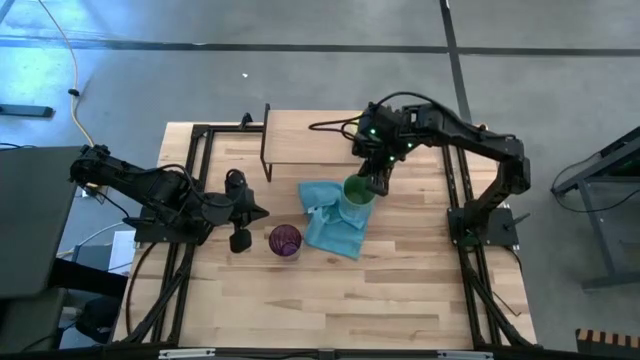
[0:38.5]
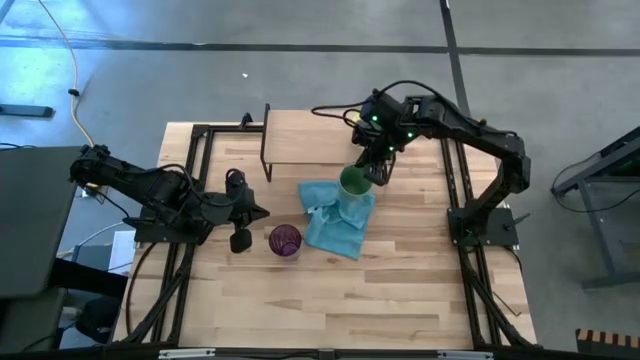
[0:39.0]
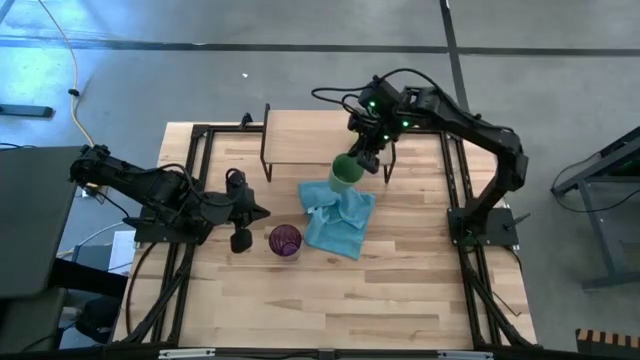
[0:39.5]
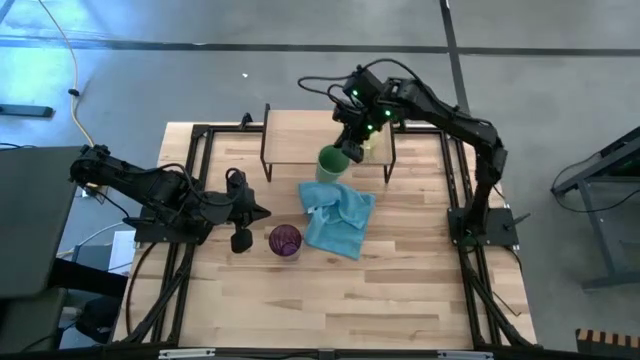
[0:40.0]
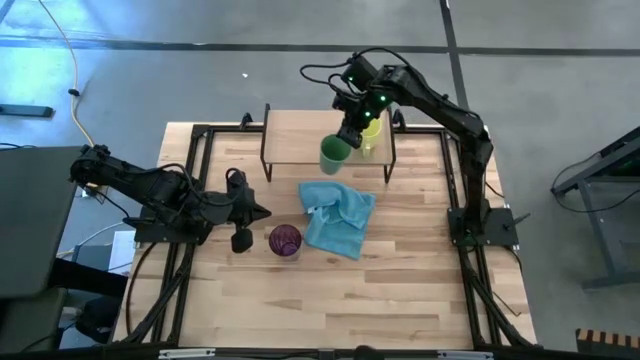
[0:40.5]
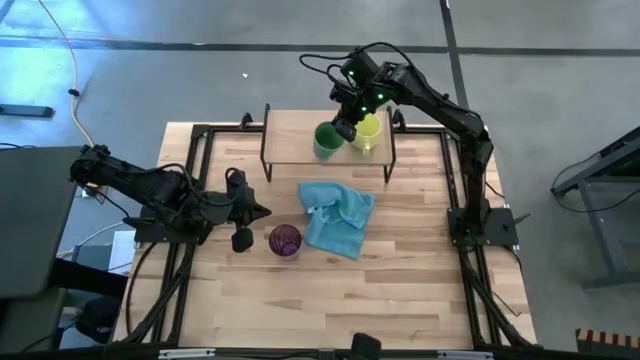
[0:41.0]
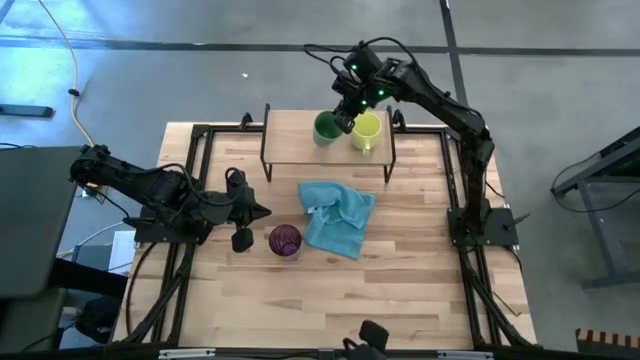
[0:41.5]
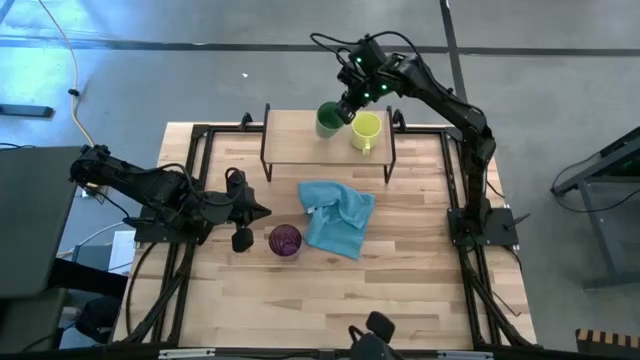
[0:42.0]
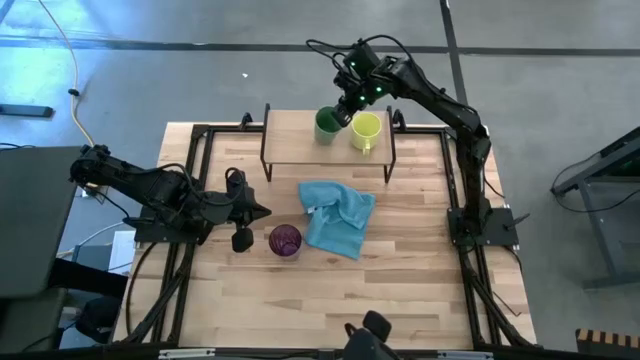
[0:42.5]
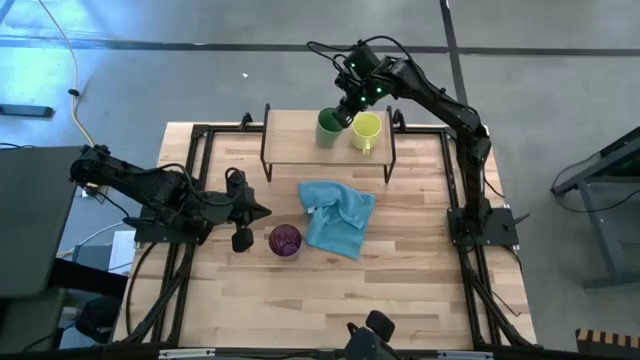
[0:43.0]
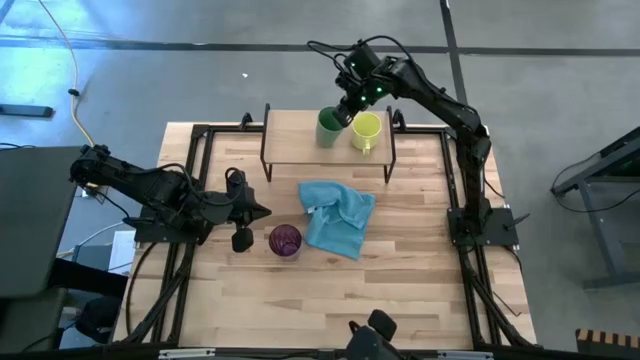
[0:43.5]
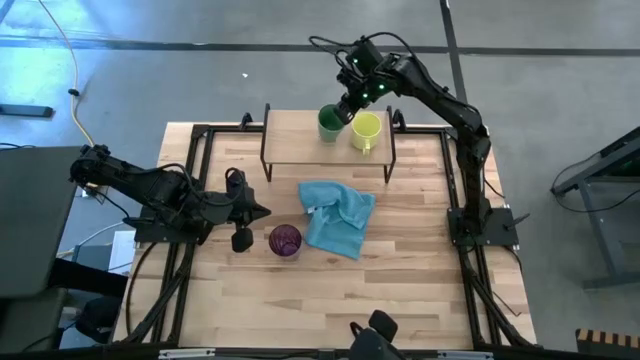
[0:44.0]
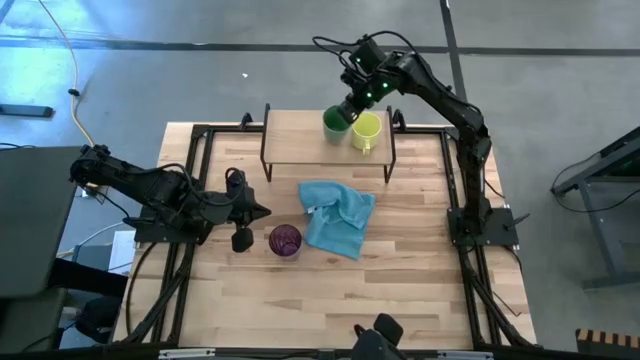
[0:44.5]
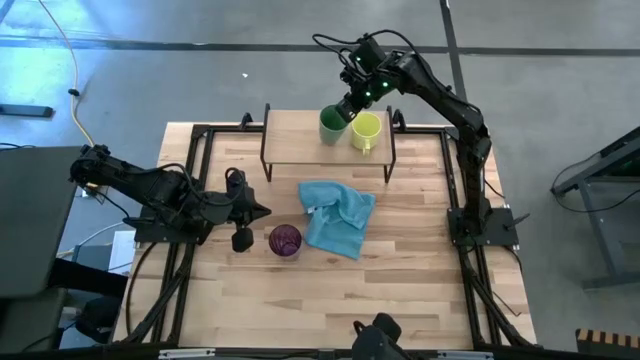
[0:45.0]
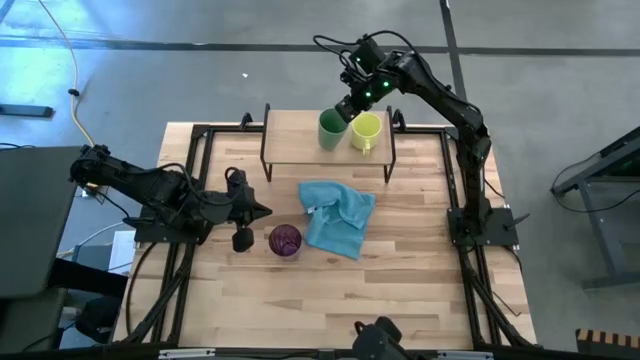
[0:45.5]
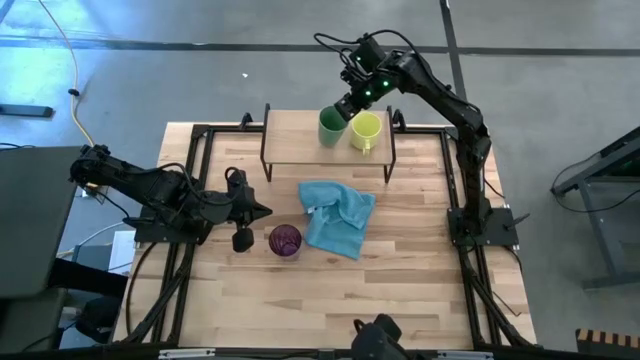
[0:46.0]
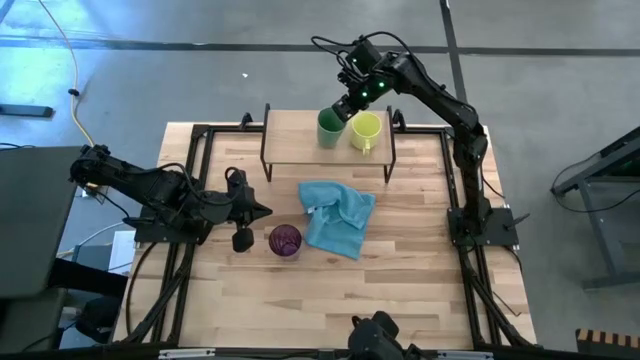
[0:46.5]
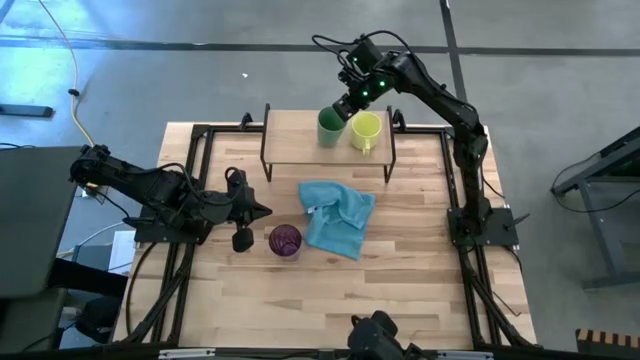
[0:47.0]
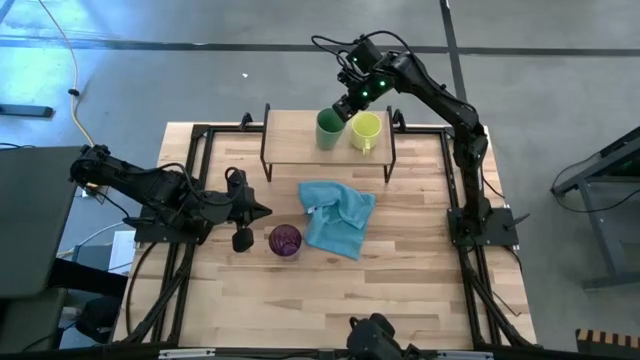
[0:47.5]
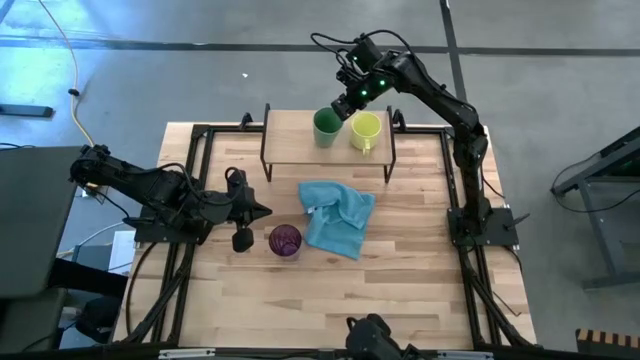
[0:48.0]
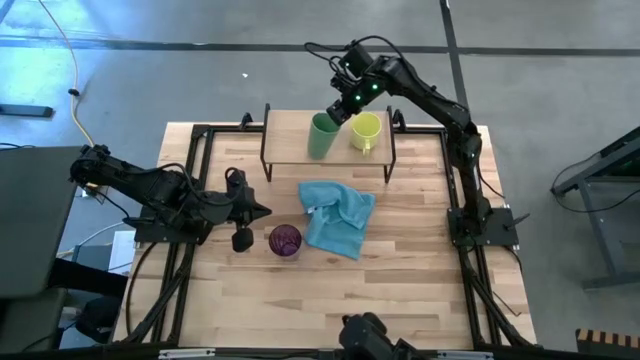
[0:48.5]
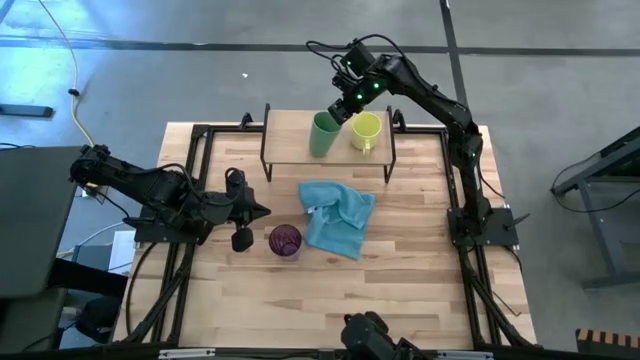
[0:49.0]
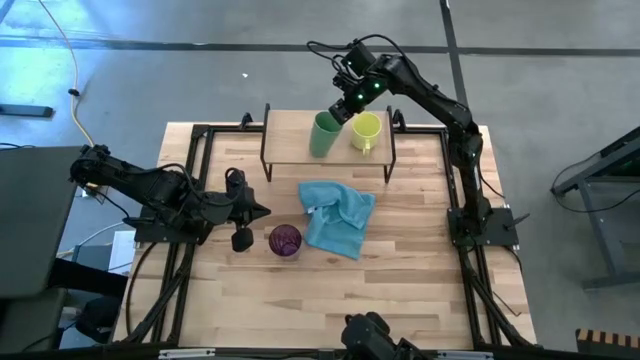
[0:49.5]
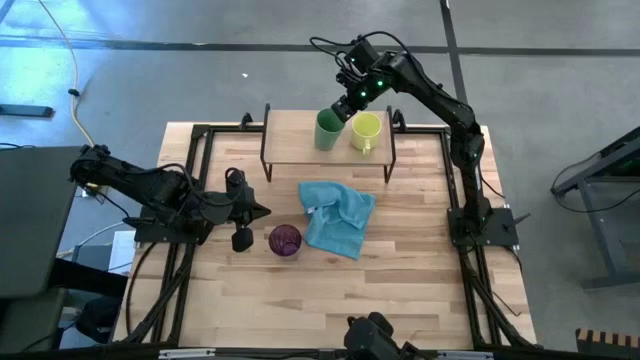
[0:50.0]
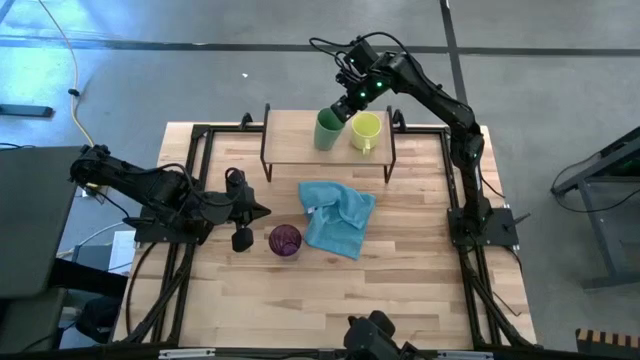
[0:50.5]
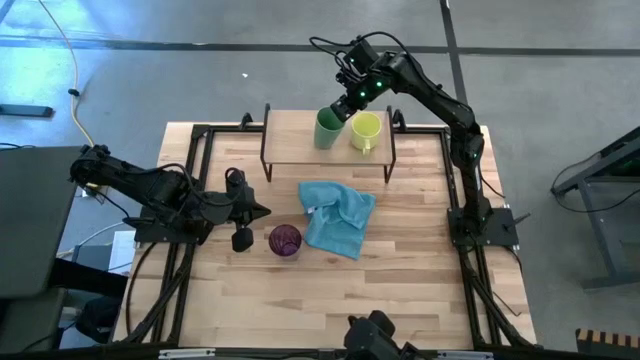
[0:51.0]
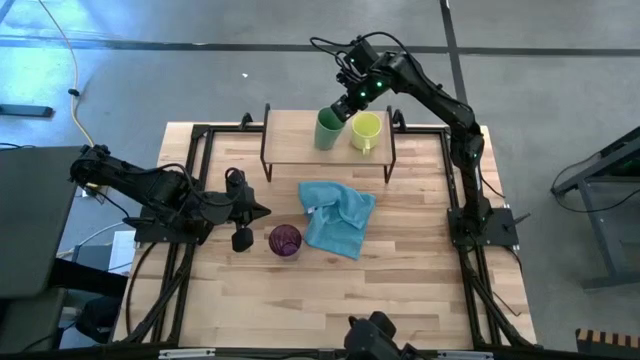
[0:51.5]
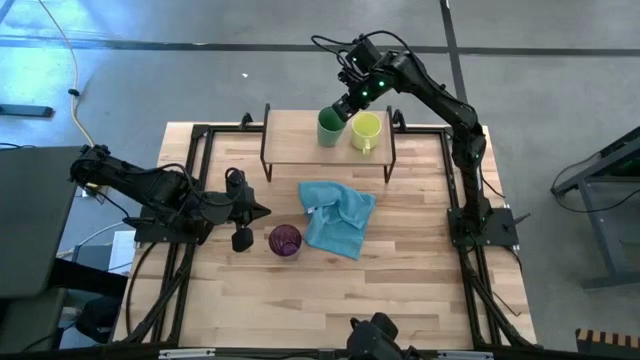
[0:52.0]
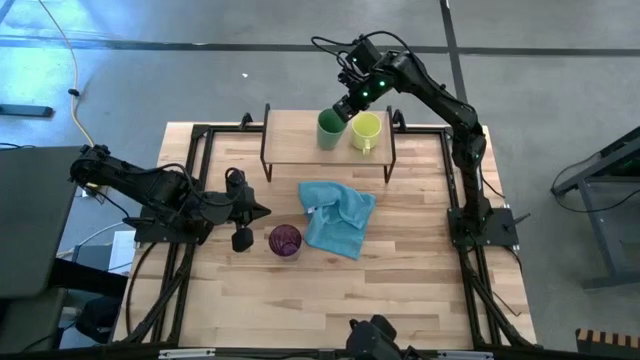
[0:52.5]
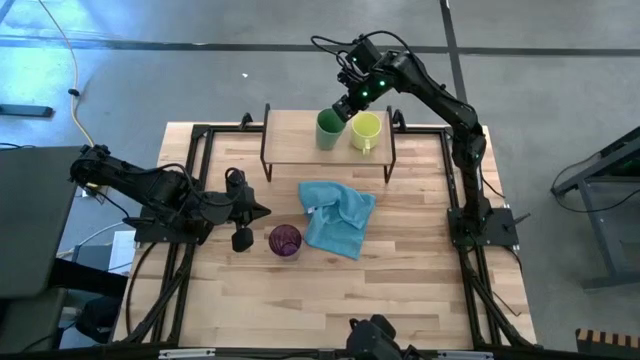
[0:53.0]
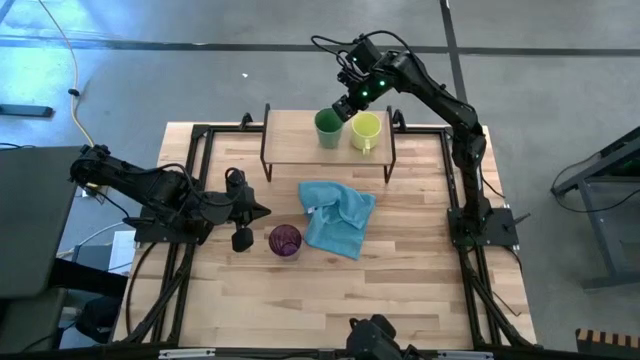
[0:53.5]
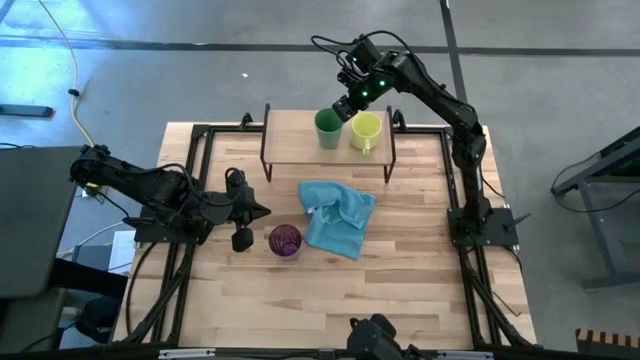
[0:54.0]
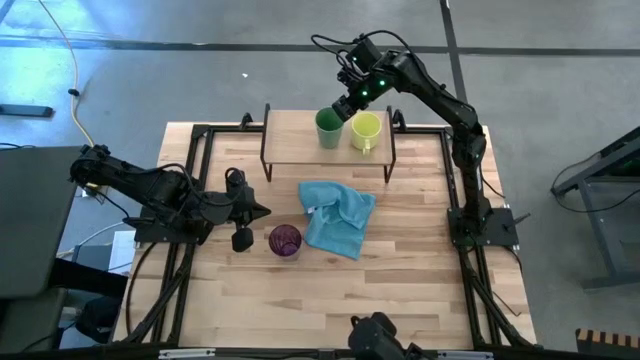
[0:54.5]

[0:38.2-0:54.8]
Task: Stack small to large cups/mugs on shelf
Put the green cup on the shelf

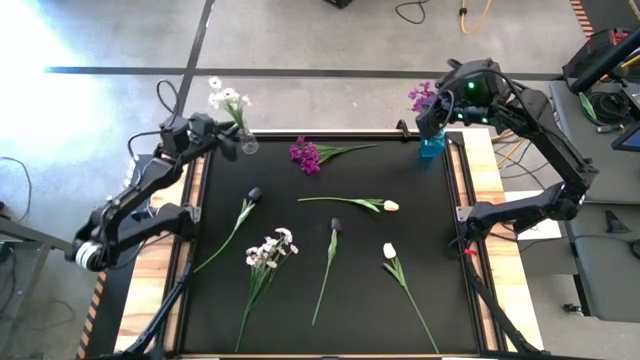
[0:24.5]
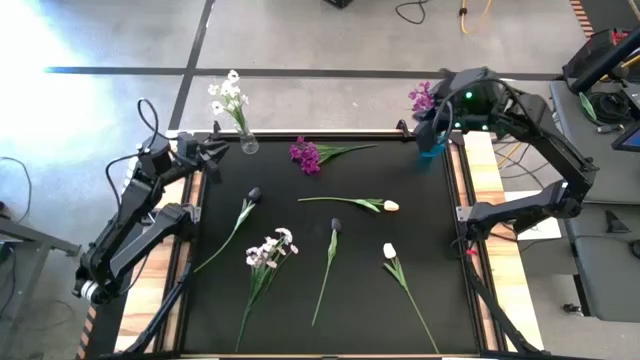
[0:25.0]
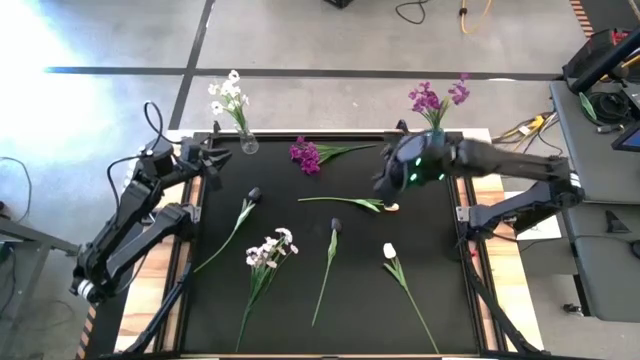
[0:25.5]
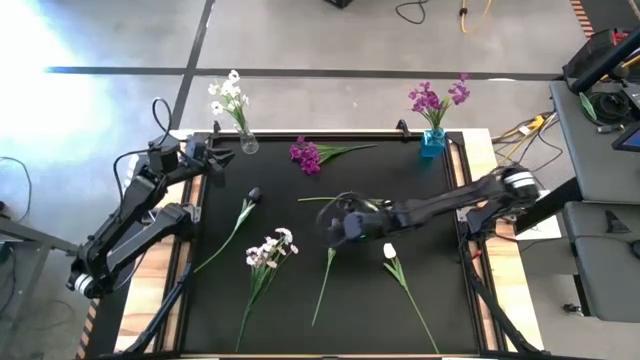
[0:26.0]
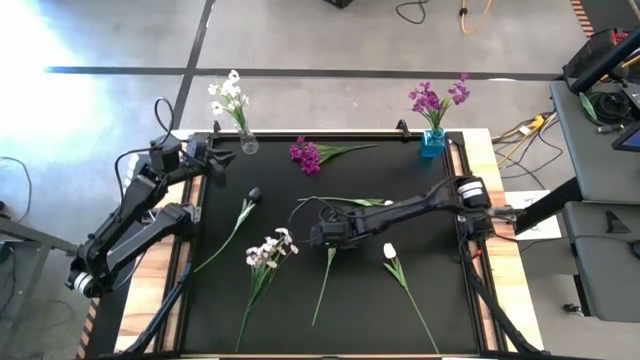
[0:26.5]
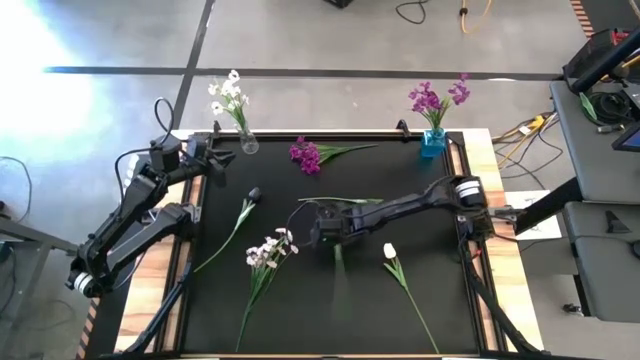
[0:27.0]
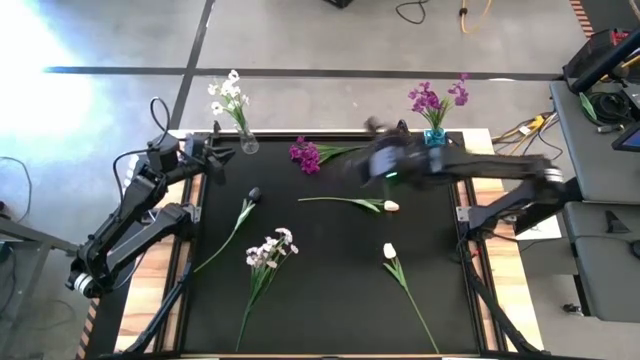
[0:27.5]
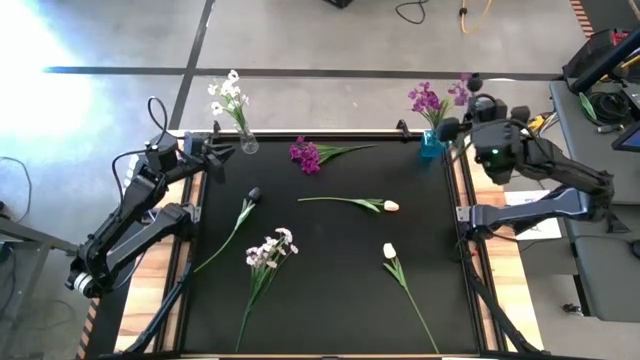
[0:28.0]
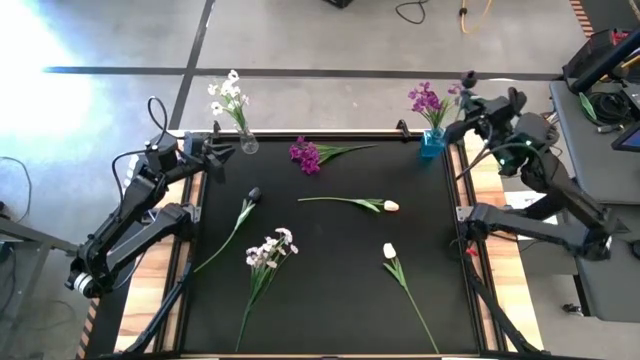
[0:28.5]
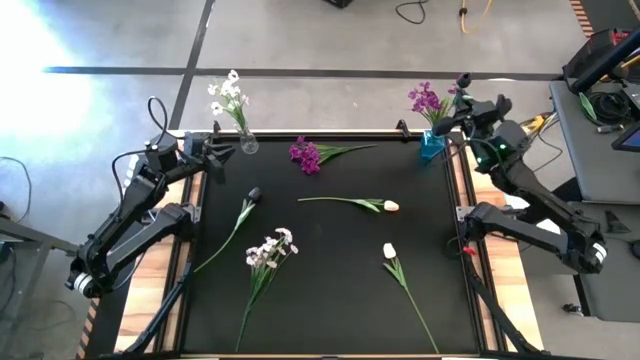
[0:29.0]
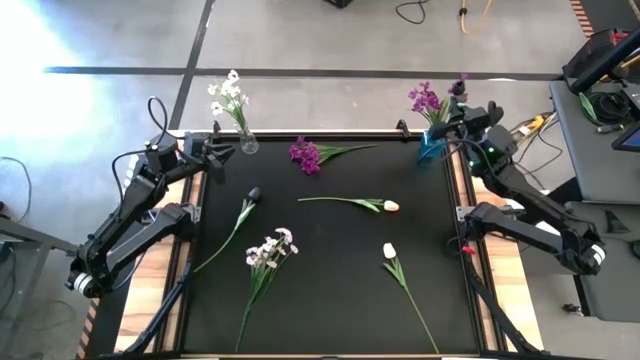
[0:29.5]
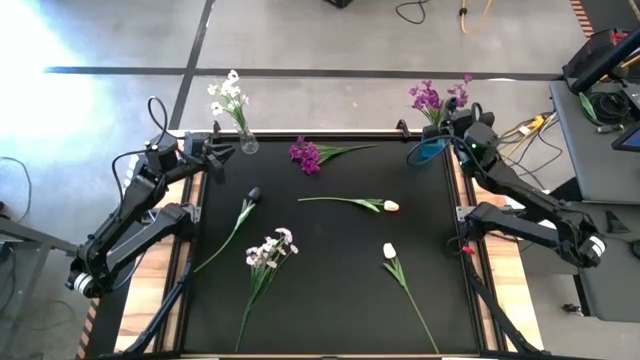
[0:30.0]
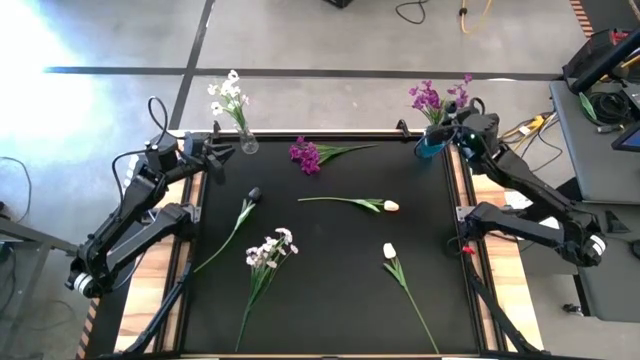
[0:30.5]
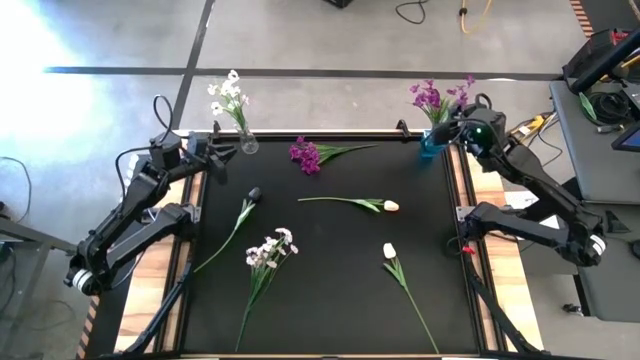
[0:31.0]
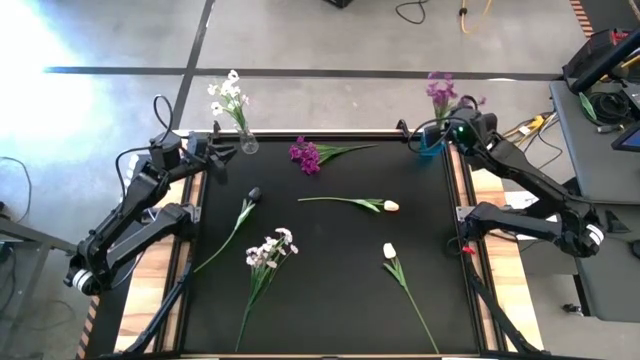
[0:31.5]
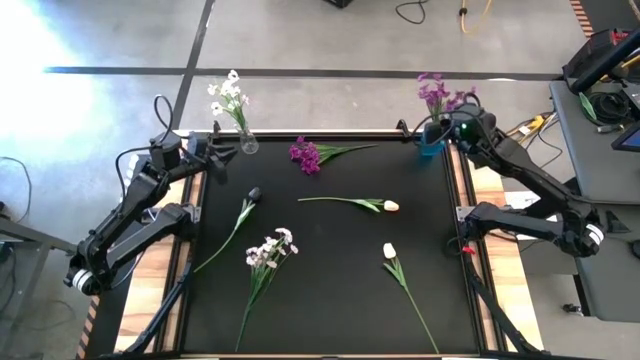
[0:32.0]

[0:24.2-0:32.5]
Task: Sort flowers into vase by color
Put the right black flower into the blue vase
